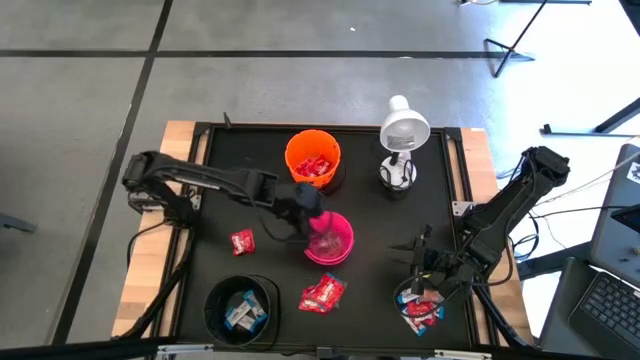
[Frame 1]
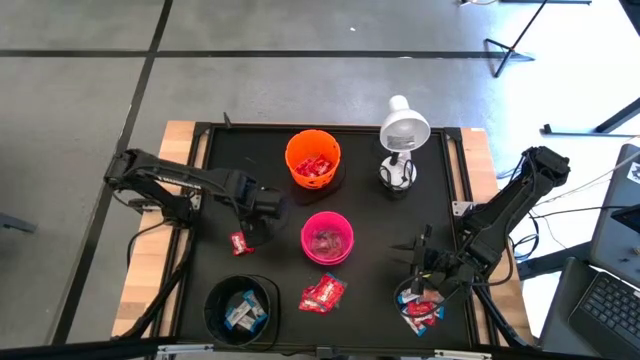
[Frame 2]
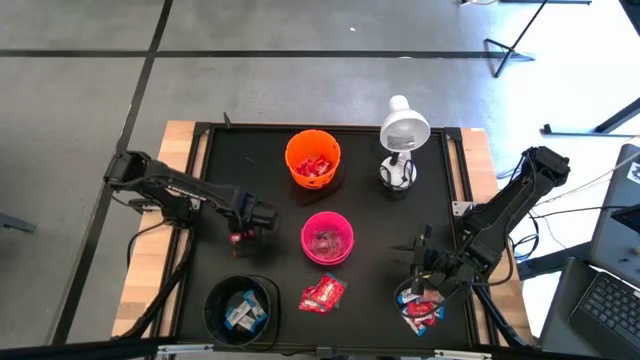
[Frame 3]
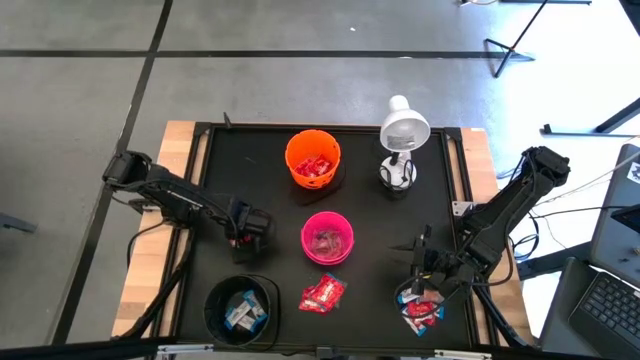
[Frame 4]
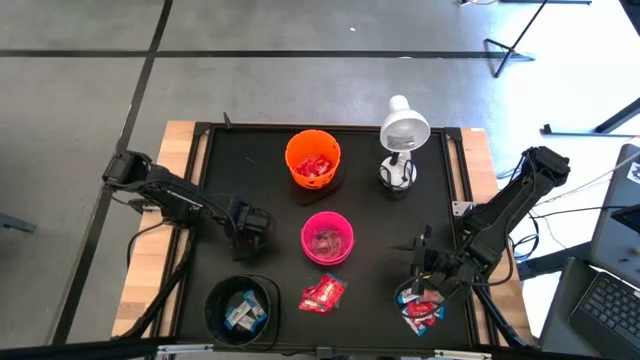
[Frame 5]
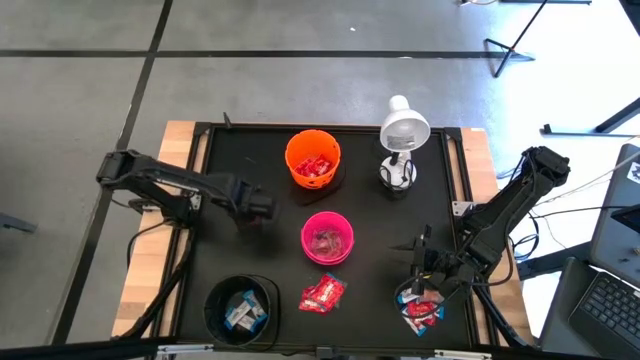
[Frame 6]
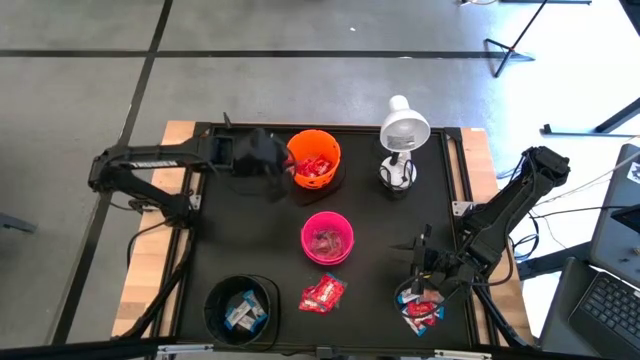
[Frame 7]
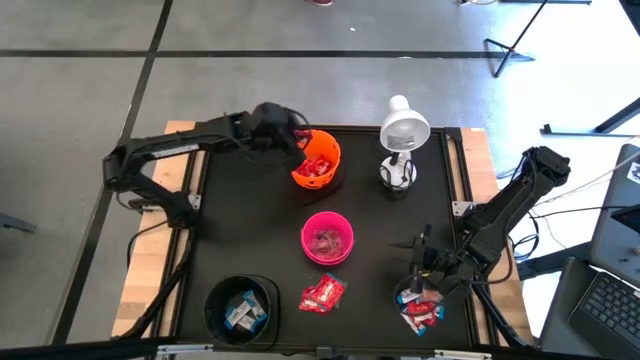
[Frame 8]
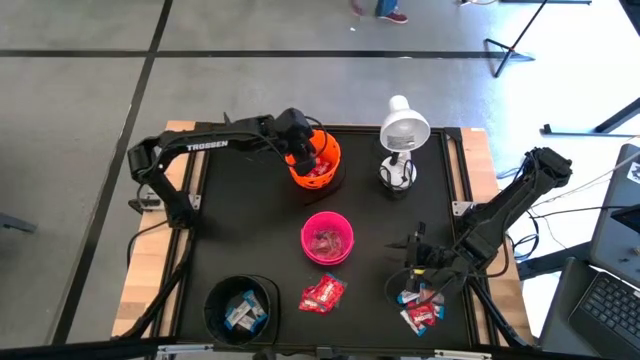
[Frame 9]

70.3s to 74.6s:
Task: Sort candy
Put the red candy into the orange bucket

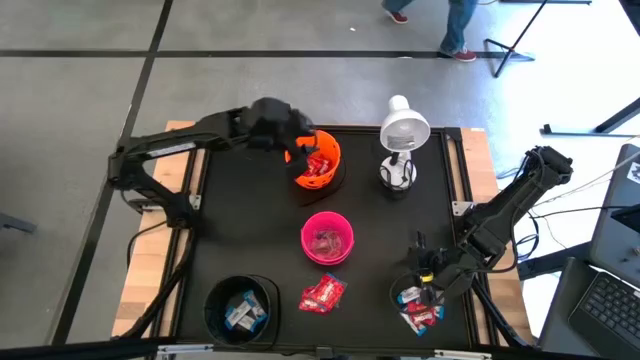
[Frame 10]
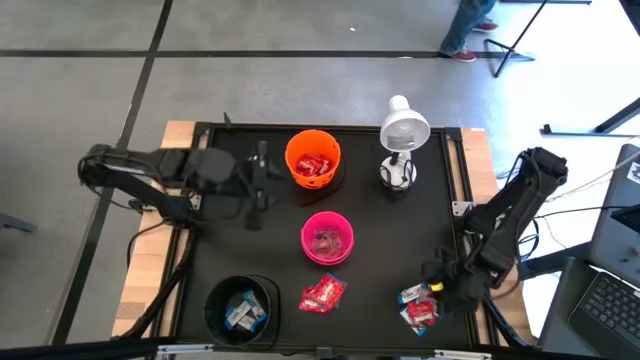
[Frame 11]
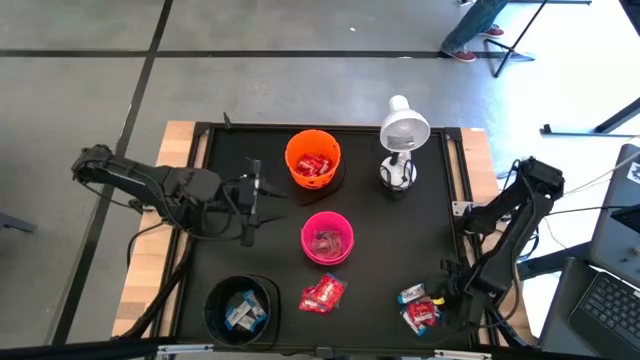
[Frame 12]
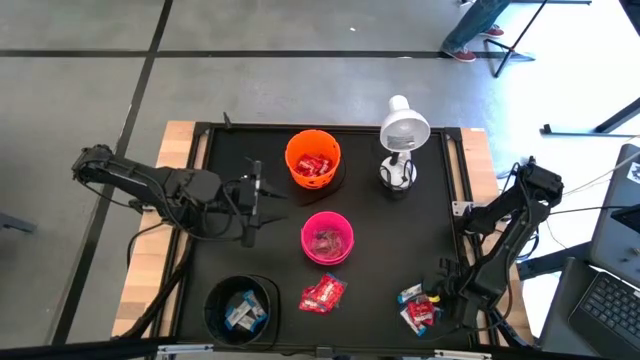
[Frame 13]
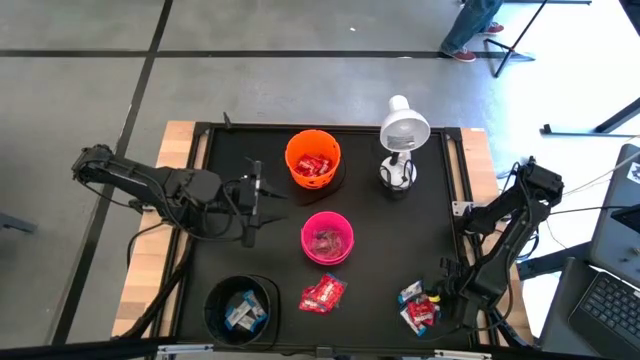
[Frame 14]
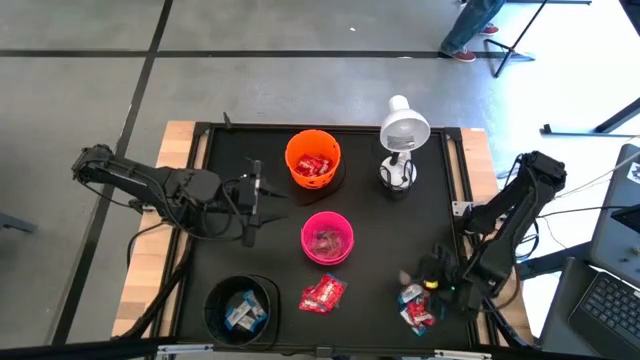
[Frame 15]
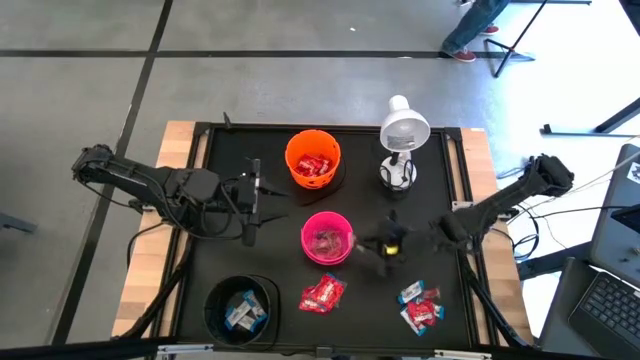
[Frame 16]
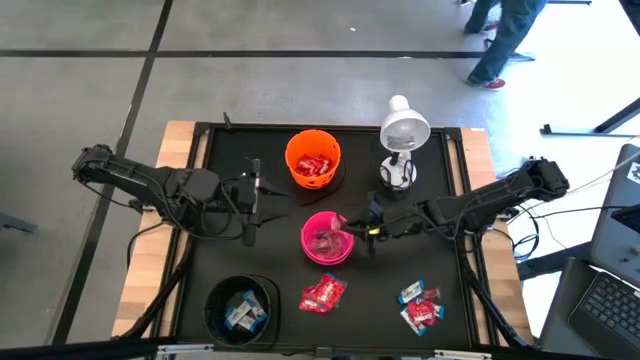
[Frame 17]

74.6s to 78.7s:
Put the orange gummy into the pink bucket

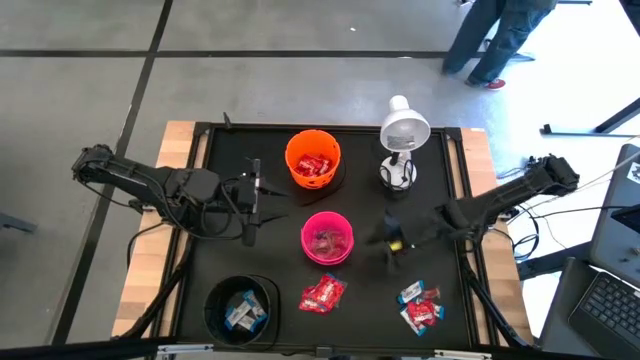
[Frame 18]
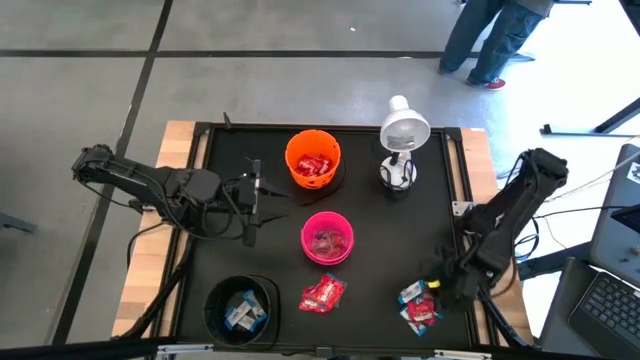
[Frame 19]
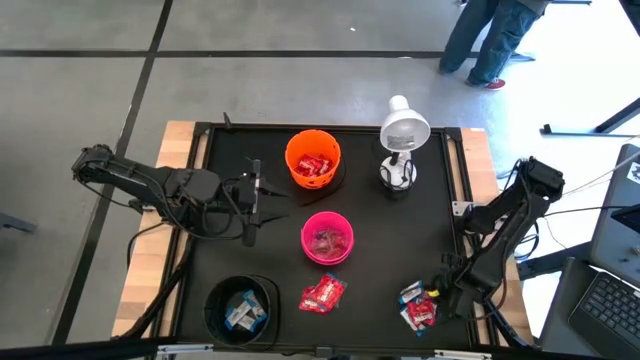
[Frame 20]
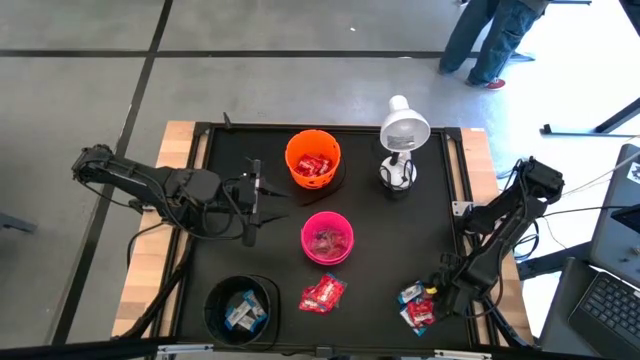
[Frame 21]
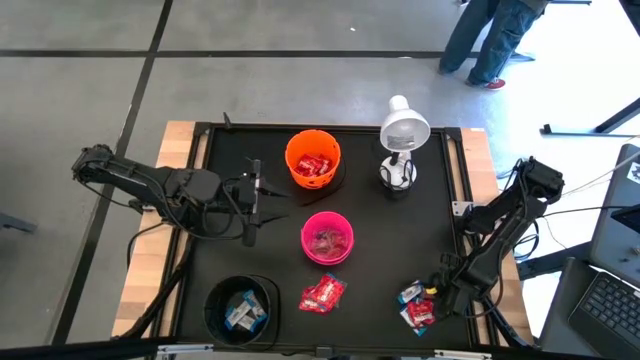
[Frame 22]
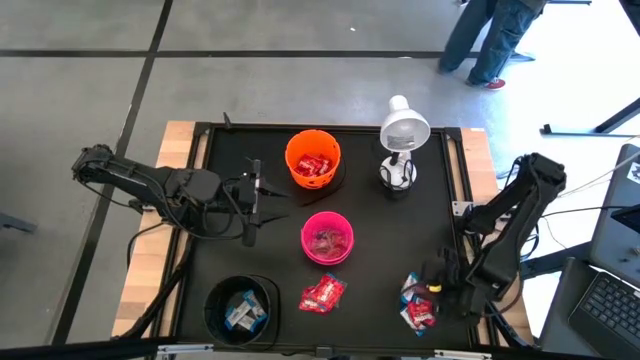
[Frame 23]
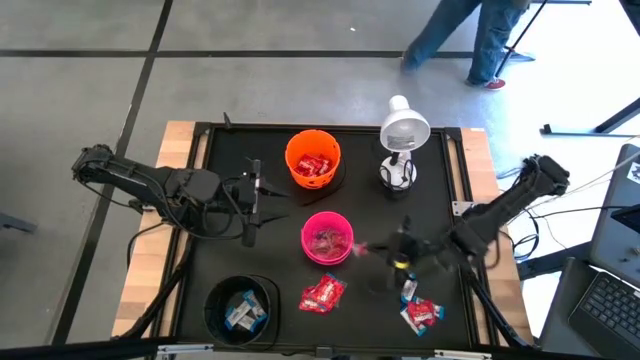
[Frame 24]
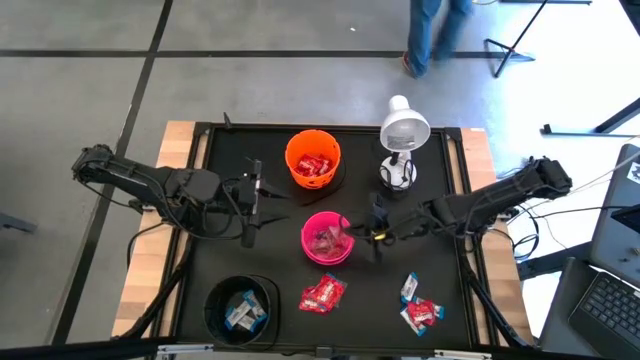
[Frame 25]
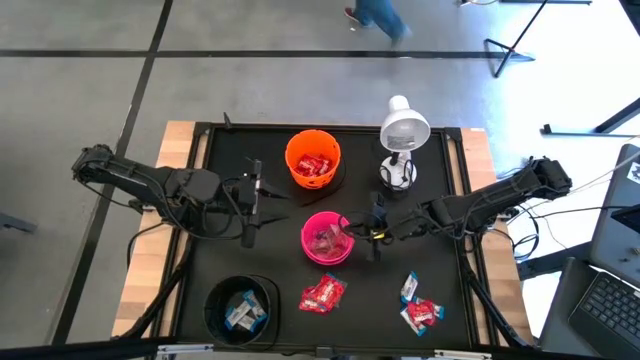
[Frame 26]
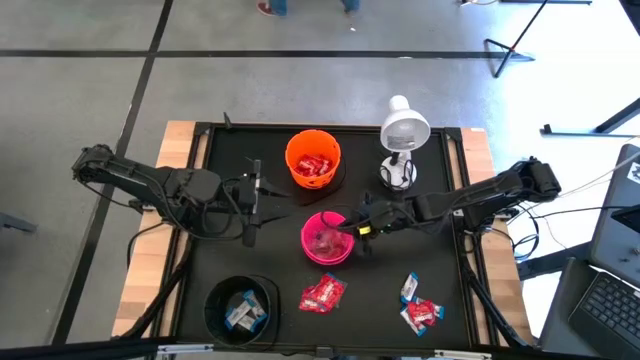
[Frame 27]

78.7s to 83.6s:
Put the orange gummy into the pink bucket

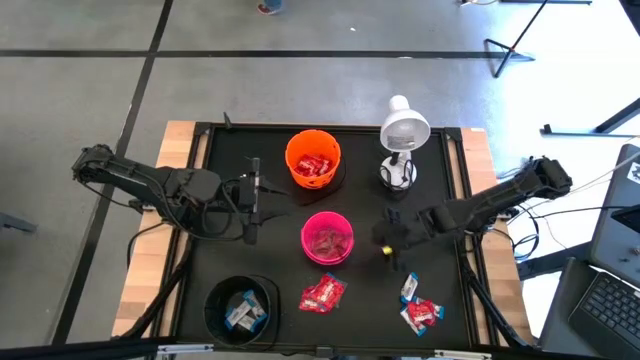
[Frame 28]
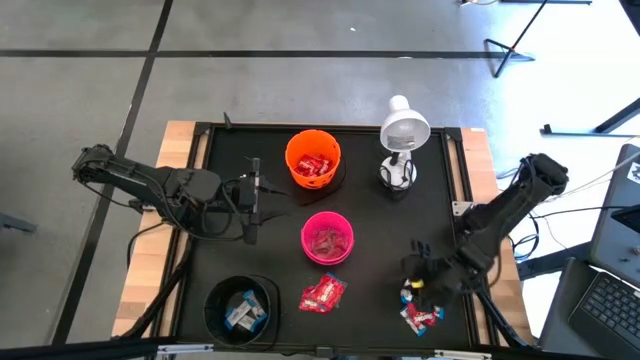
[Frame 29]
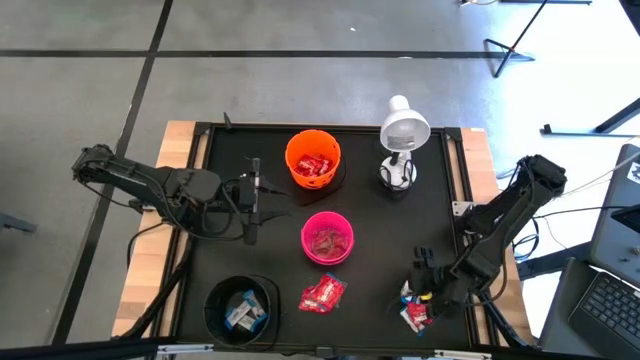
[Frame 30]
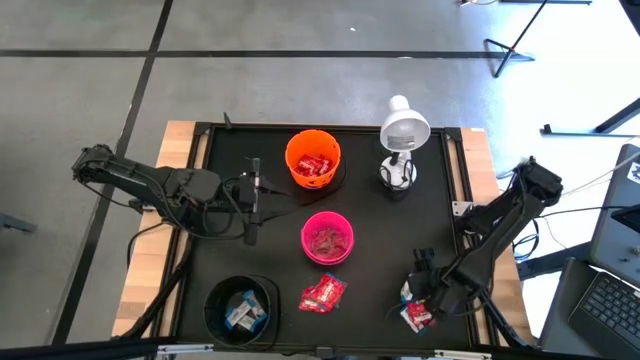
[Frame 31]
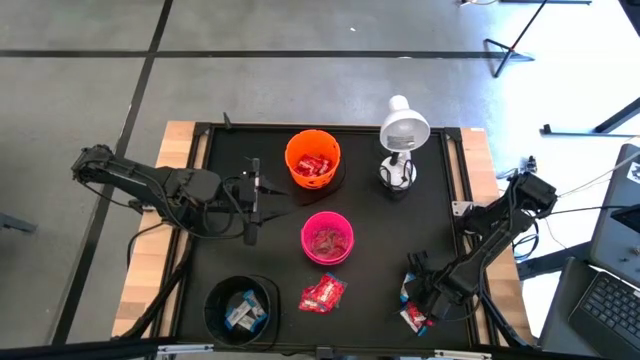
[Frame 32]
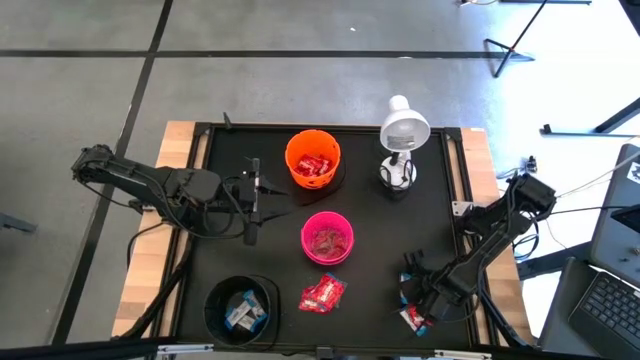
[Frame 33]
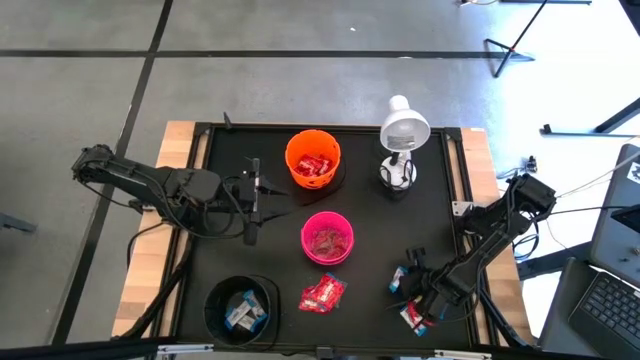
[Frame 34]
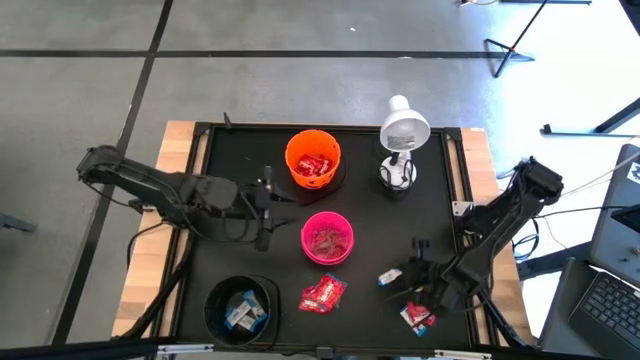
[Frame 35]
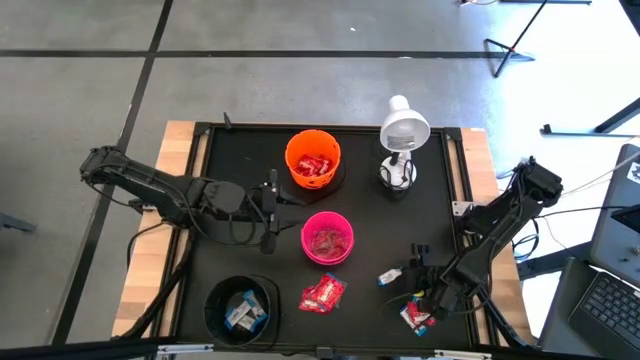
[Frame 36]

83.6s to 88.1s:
Put the white chocolate into the black bucket

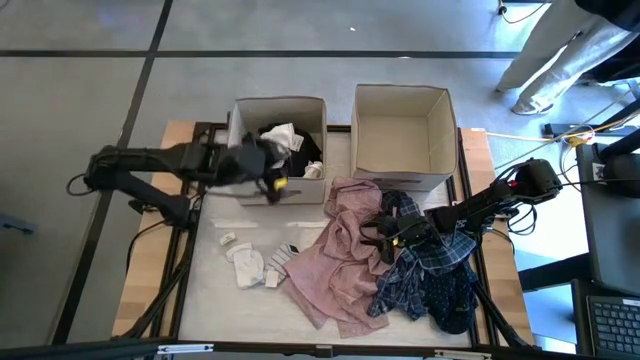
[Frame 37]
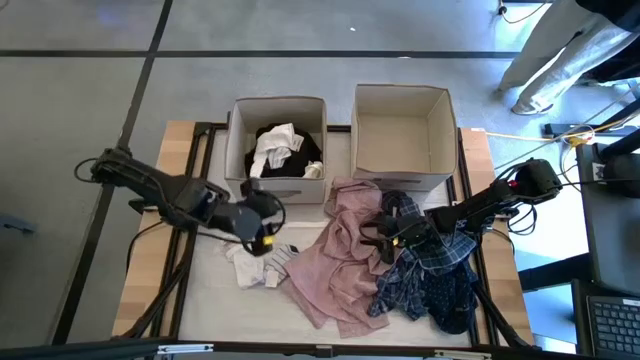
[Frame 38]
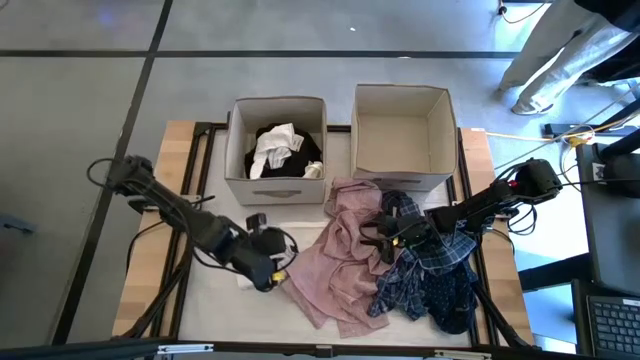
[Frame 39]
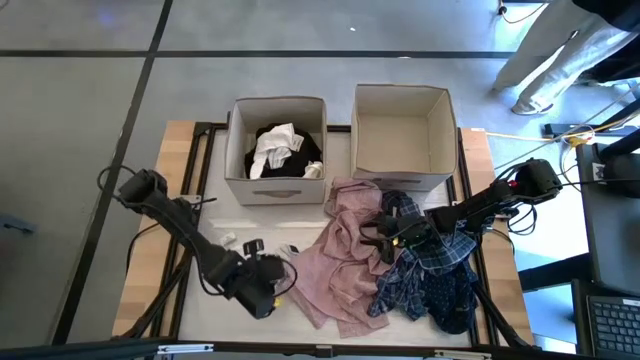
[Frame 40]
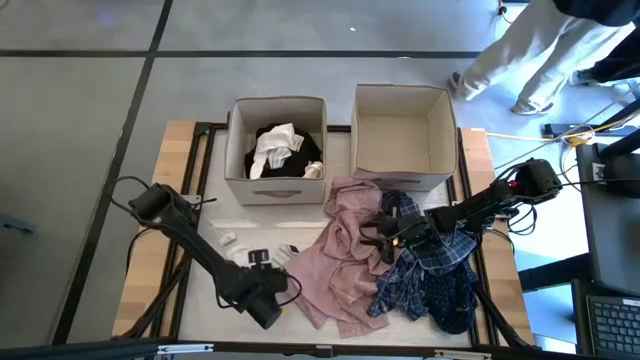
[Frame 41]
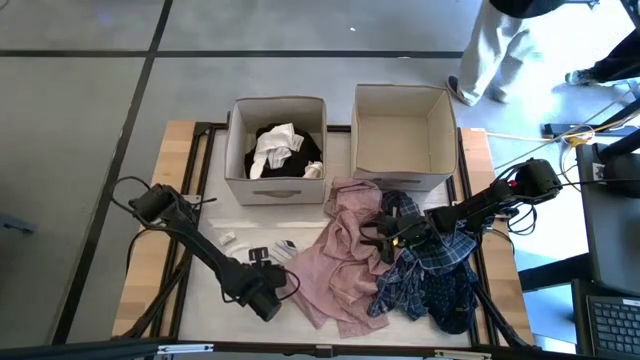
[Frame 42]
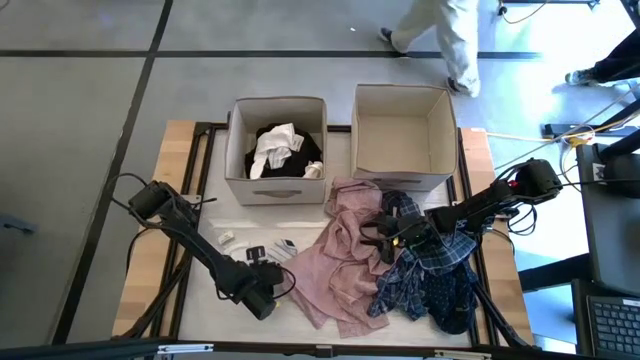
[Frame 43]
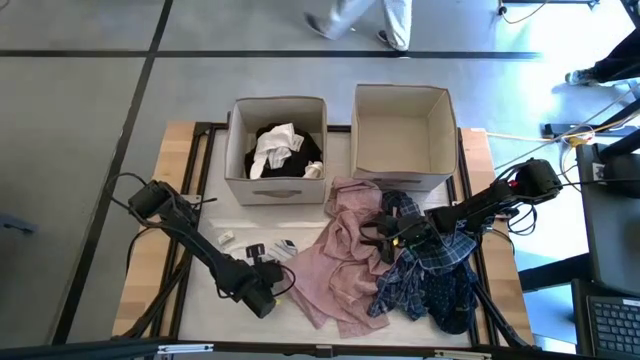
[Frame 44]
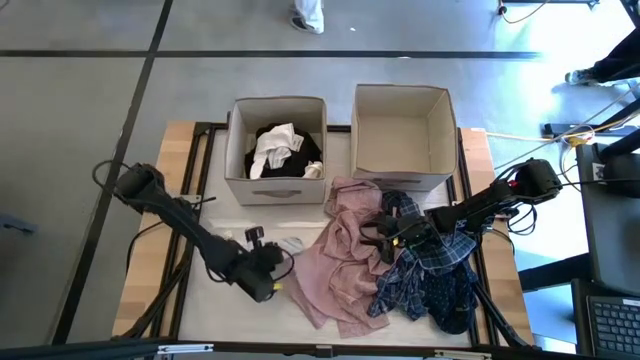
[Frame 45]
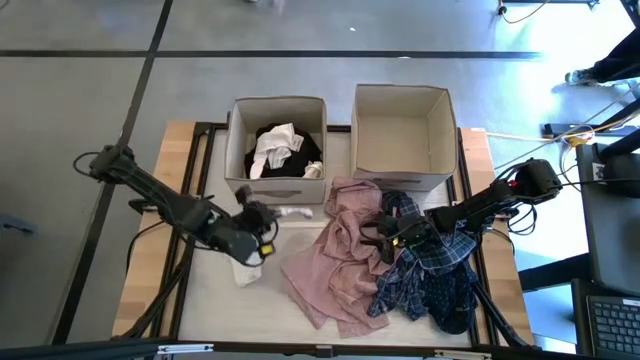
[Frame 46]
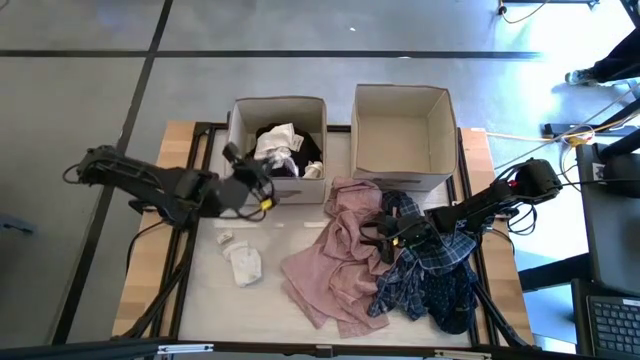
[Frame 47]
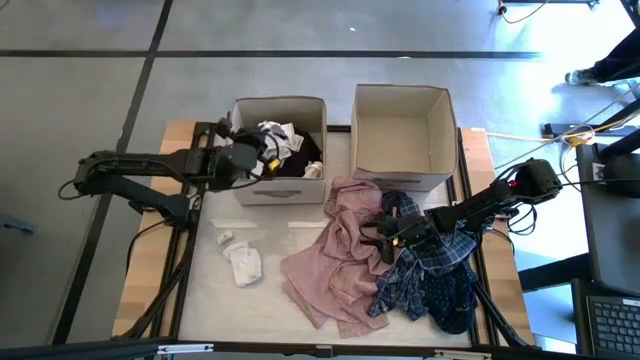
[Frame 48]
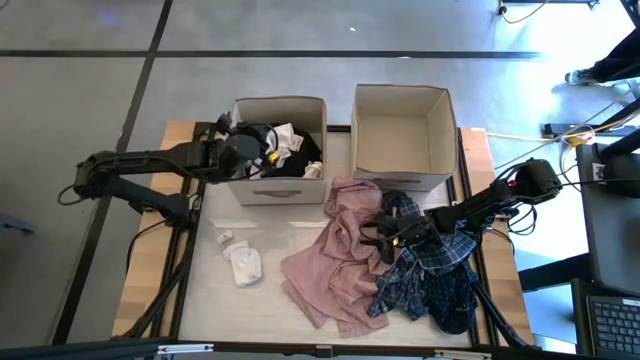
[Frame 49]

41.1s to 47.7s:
Task: Sort clothes
Put the white striped sock into the left laundry organizer
